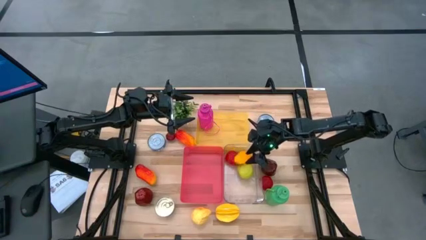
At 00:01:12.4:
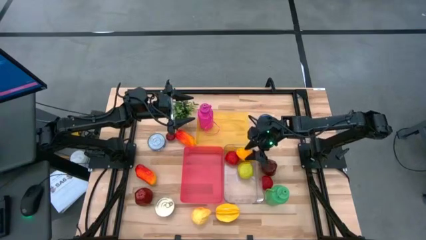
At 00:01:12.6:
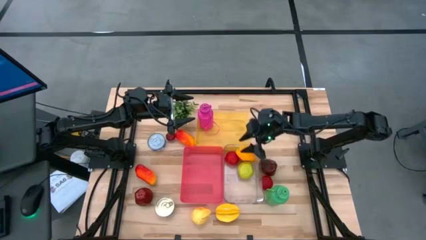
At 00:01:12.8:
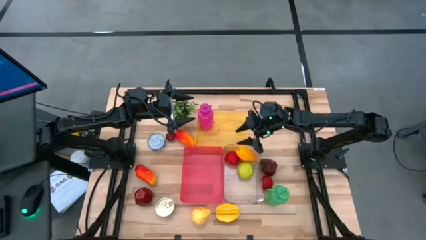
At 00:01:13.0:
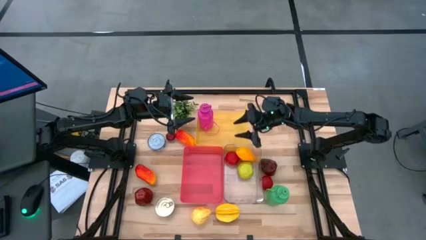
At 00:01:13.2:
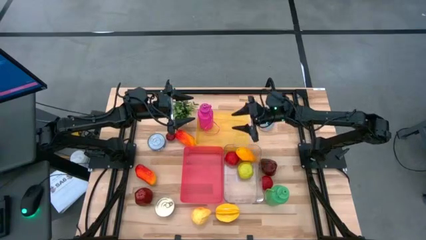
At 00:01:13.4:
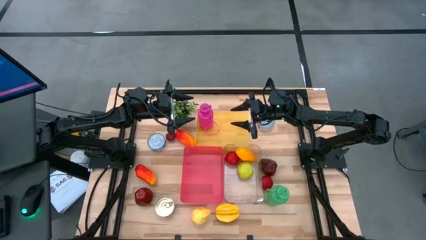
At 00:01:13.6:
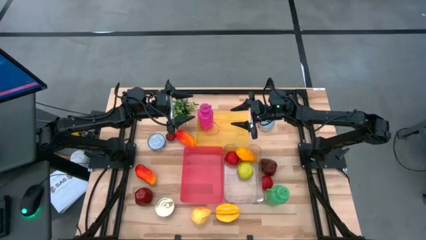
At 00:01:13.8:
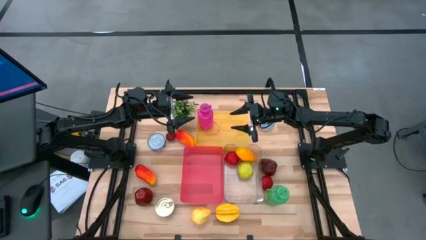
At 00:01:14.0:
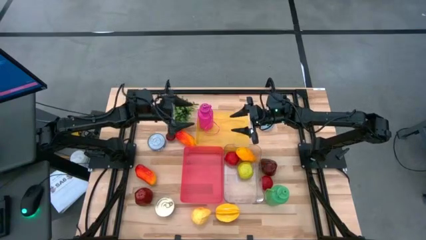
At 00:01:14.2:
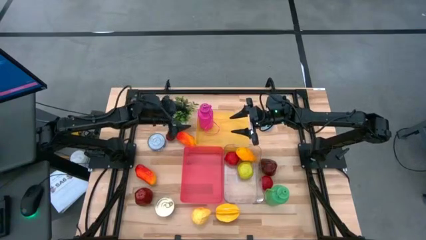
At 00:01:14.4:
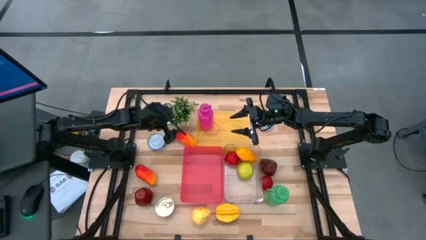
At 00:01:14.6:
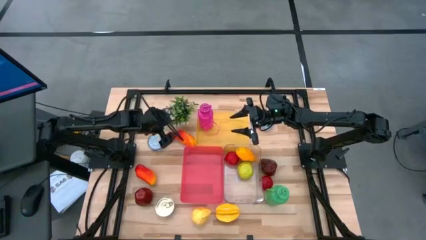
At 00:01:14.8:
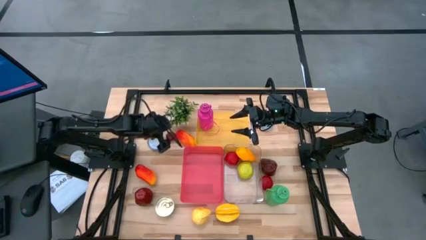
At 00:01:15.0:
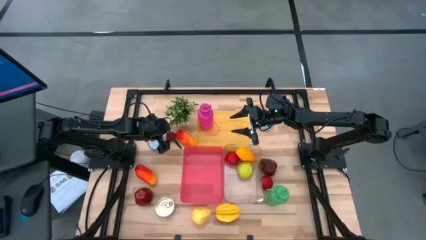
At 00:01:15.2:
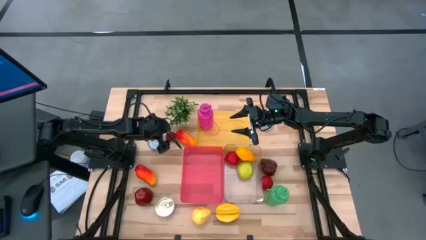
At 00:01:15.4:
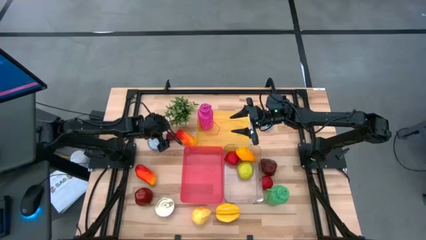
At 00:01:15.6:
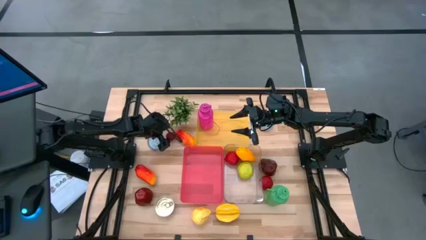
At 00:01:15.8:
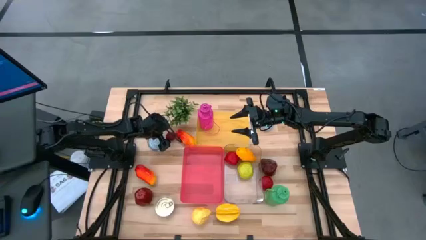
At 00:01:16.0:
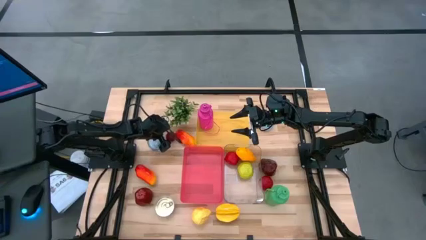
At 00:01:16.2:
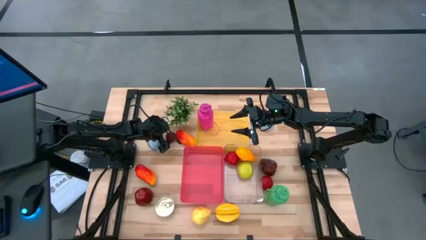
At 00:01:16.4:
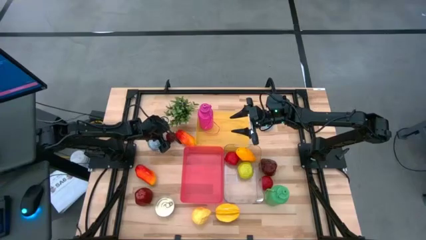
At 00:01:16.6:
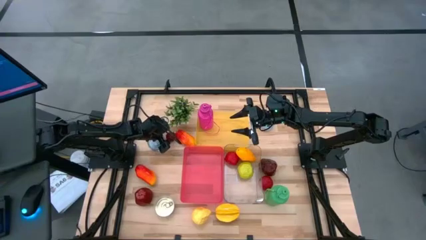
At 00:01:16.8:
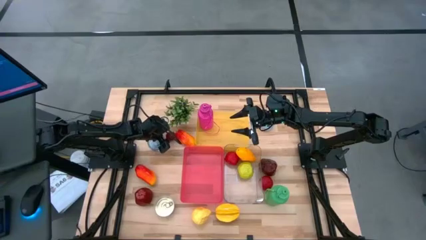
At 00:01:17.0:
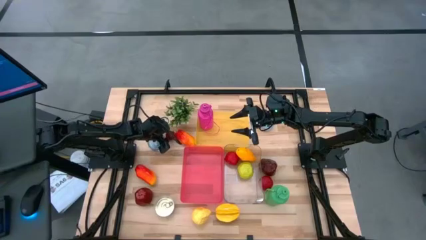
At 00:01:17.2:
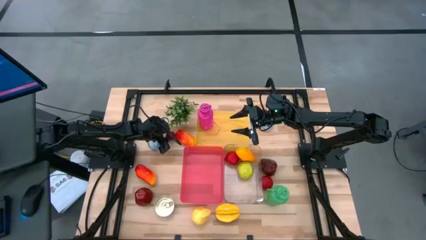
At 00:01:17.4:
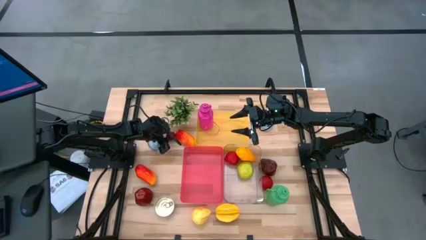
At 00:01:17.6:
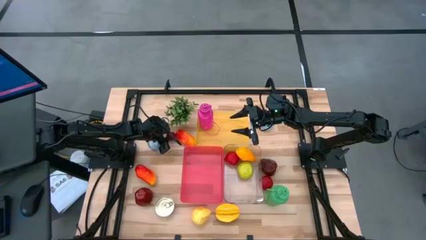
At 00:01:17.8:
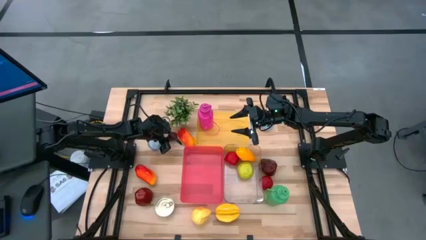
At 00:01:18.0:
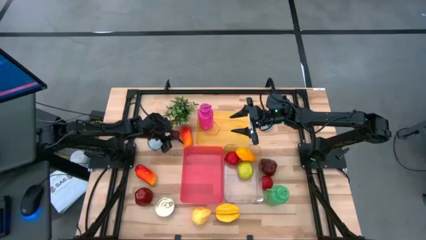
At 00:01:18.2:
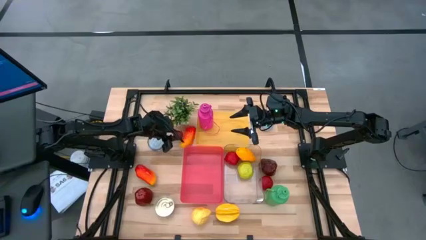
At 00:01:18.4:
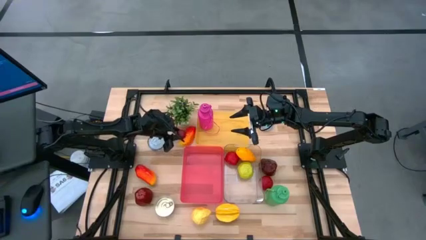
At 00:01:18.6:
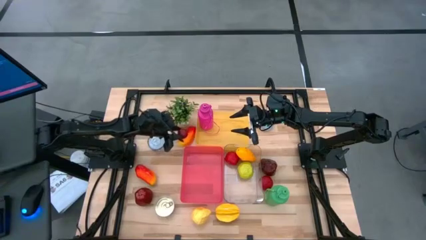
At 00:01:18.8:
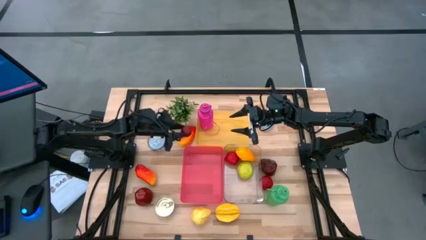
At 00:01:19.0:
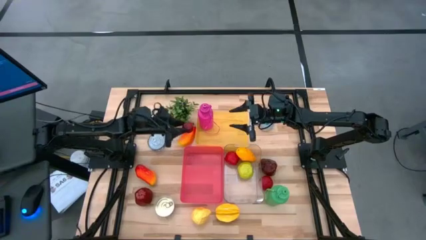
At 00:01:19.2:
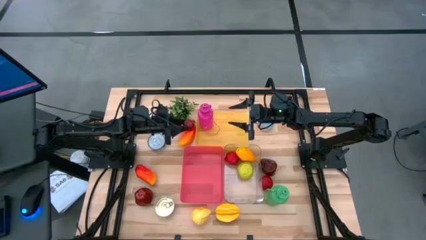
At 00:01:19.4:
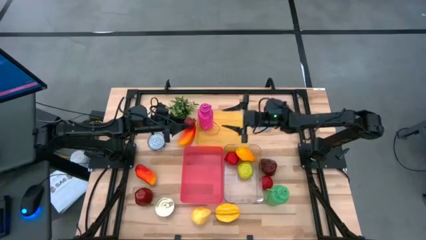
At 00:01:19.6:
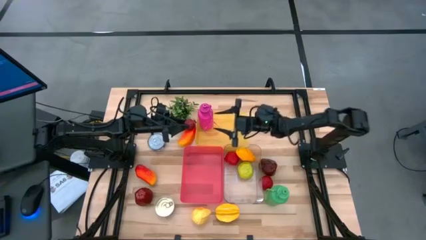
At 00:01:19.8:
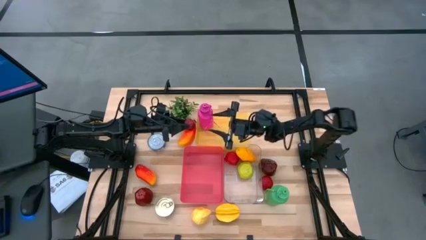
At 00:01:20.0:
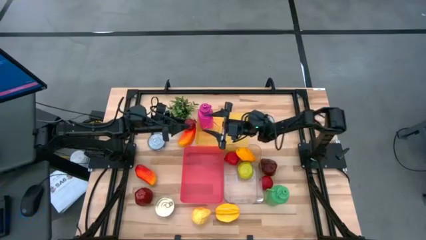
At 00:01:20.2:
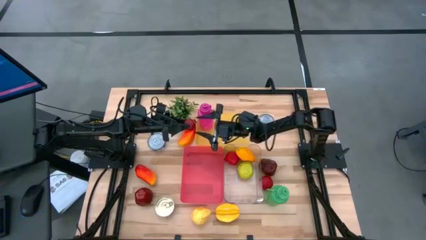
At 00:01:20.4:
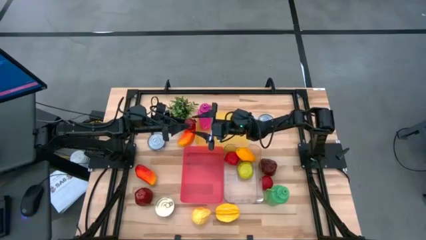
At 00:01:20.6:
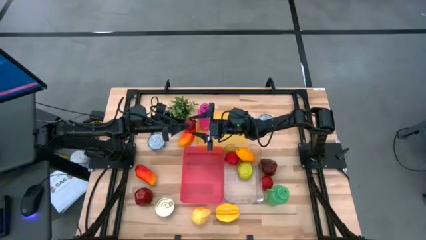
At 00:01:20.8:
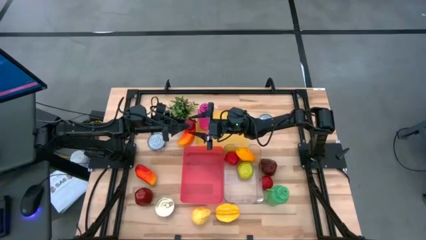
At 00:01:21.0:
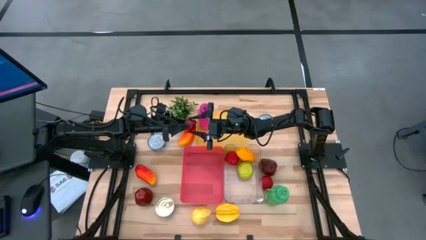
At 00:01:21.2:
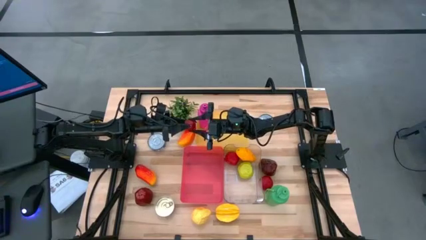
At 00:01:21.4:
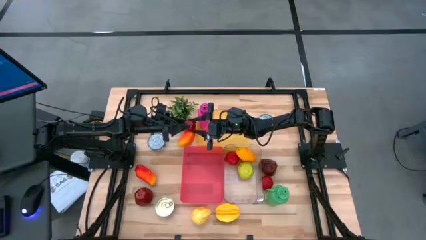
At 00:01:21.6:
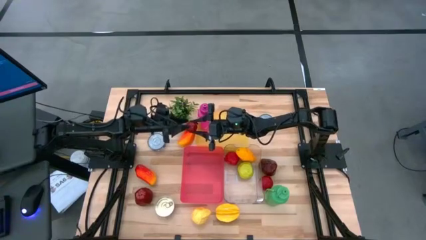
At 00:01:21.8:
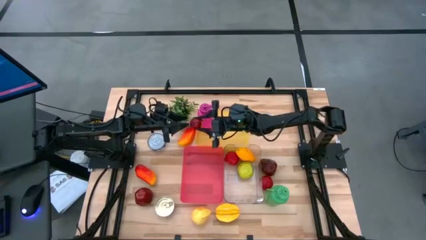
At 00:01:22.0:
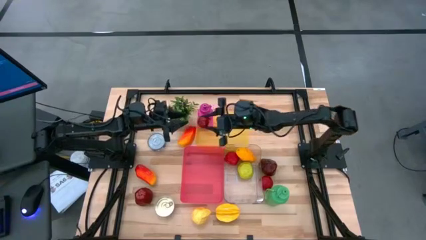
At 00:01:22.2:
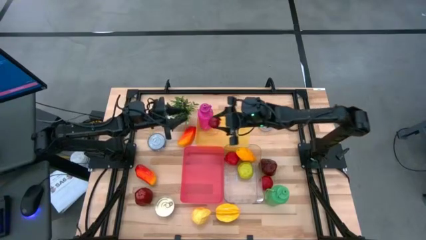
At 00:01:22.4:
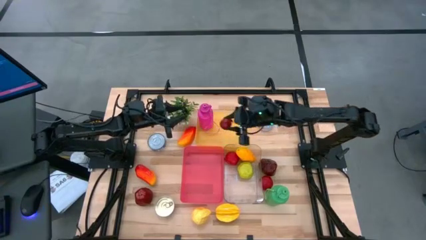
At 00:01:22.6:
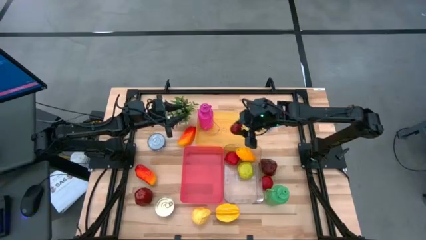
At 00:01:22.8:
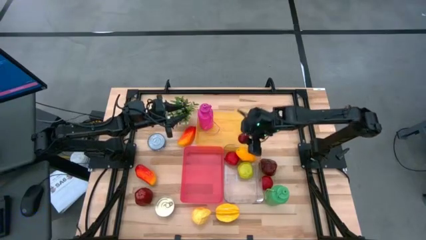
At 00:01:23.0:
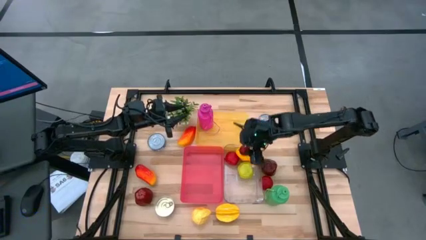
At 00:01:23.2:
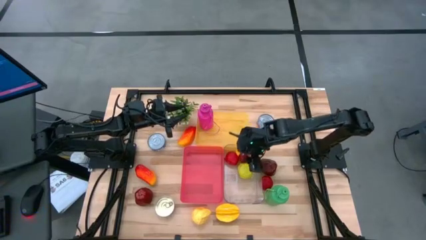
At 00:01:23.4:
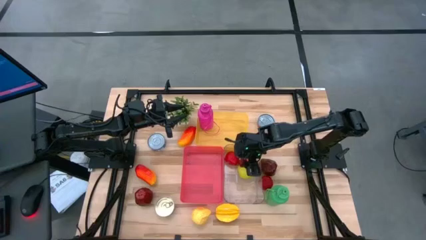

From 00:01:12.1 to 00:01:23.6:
Task: Pick & Place Food Item
Put the top pomegranate into the transparent bin

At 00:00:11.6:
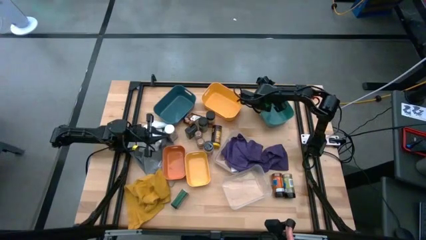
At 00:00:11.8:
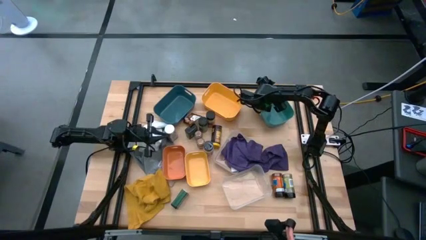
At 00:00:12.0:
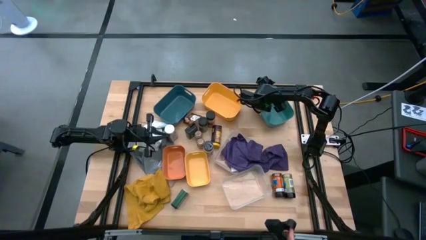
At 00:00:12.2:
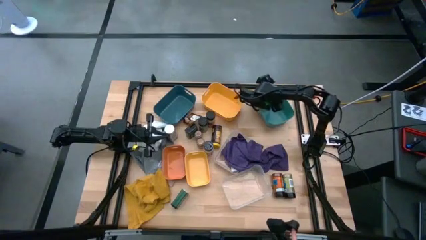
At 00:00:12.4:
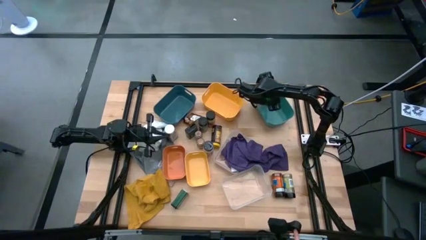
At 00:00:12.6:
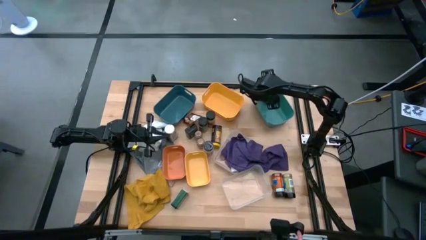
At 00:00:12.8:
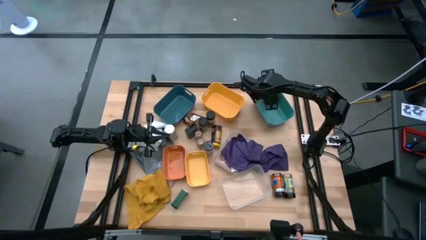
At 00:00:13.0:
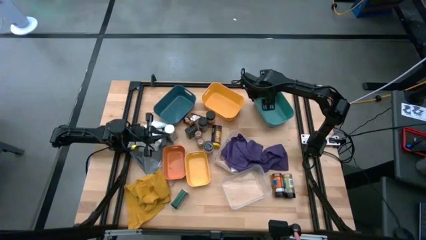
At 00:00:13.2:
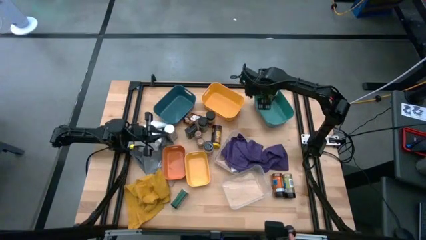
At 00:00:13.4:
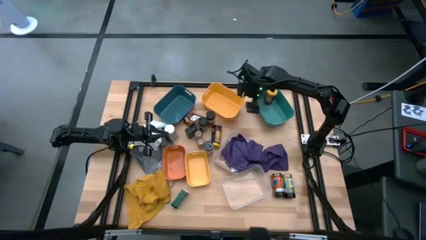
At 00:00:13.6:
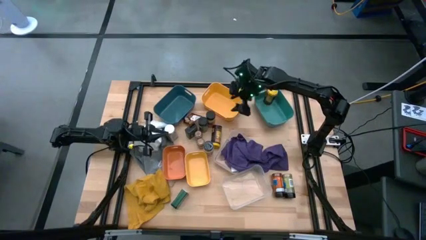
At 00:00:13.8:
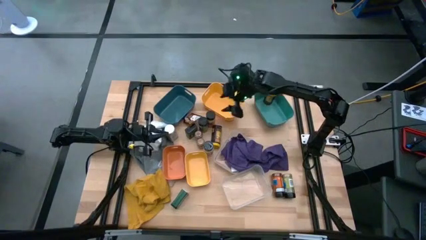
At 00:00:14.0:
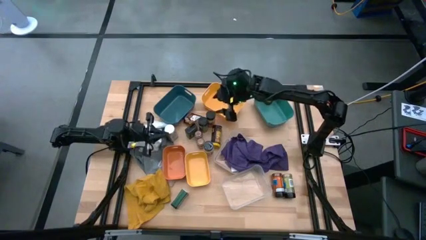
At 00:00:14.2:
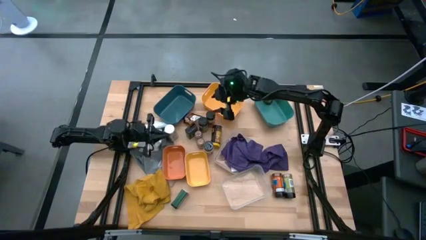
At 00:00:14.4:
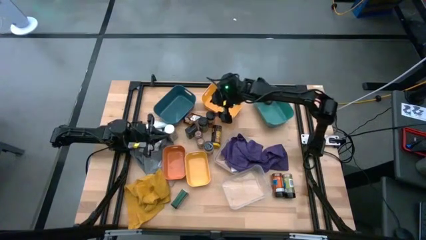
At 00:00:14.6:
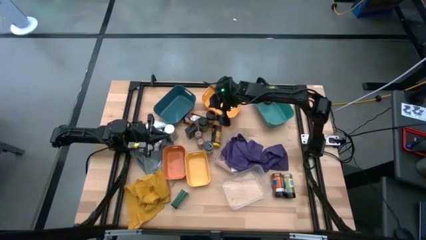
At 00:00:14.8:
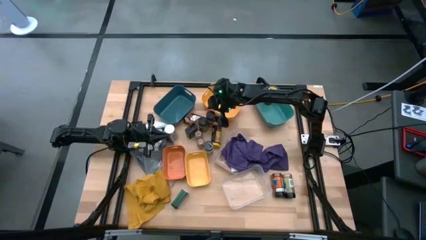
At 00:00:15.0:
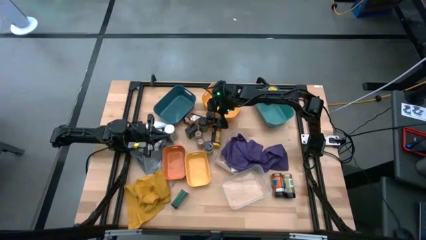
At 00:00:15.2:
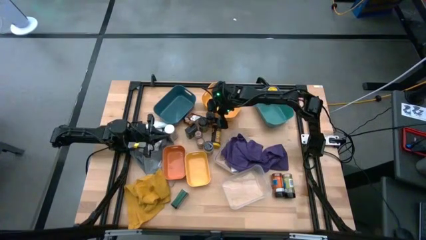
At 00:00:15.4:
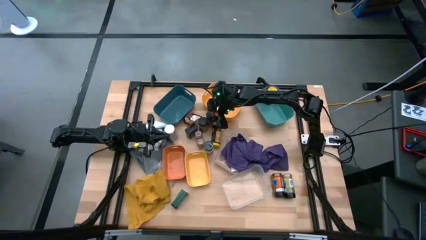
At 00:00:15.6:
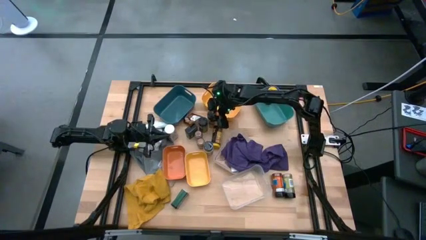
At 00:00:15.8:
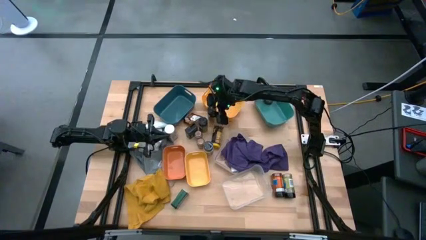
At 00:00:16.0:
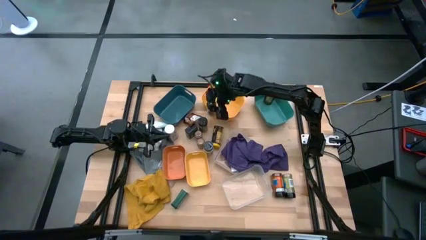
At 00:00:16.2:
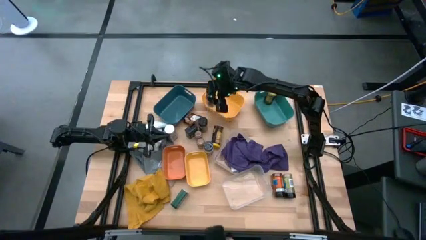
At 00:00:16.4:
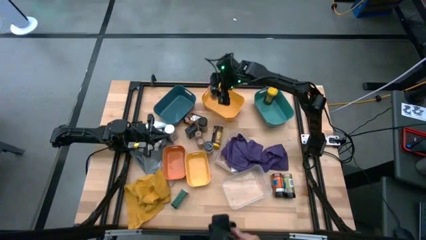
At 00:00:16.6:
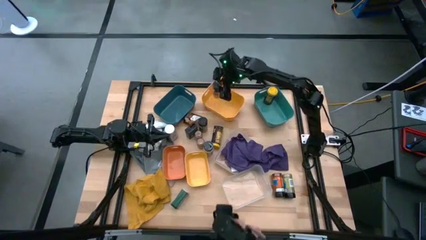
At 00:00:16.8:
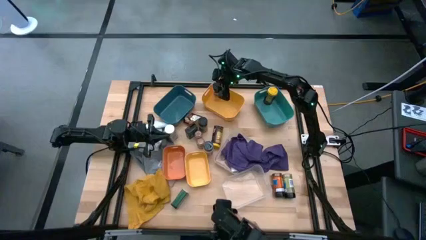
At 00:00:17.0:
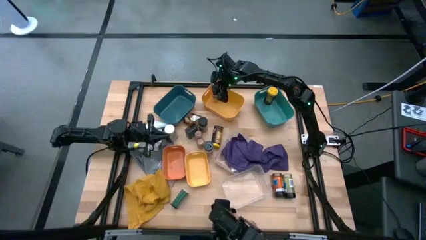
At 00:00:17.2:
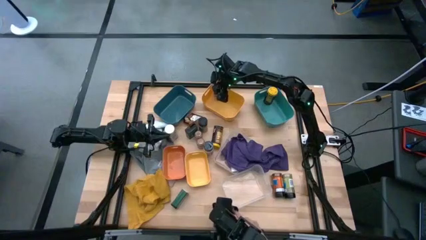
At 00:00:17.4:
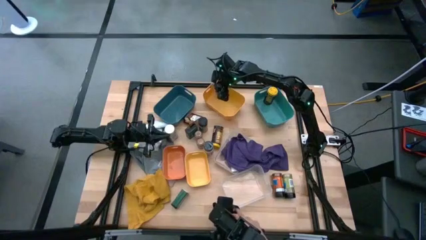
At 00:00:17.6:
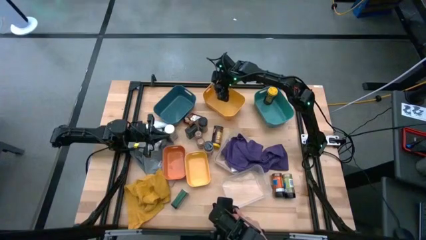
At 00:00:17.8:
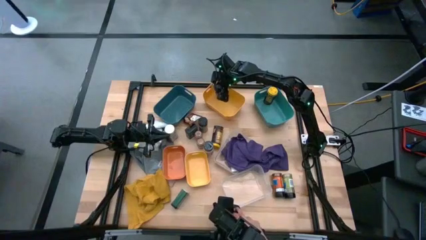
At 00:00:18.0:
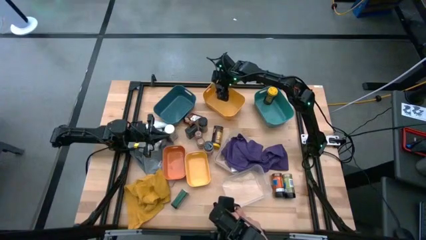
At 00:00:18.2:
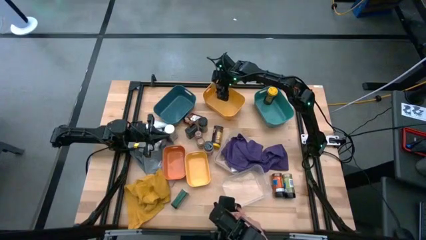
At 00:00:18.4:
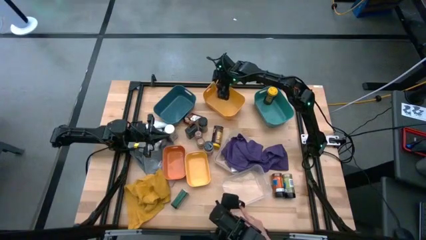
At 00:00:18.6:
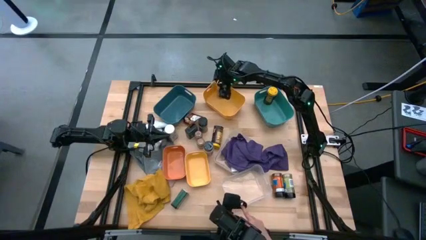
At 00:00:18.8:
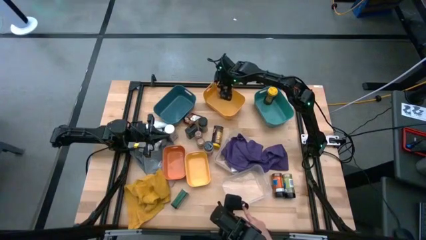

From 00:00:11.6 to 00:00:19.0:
Task: Sort spices by type
Put the light orange spice bottle into the yellow bin
